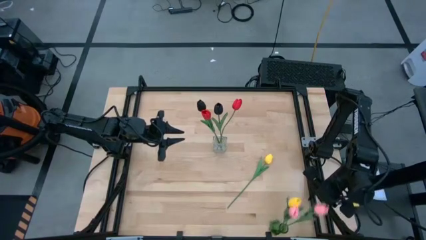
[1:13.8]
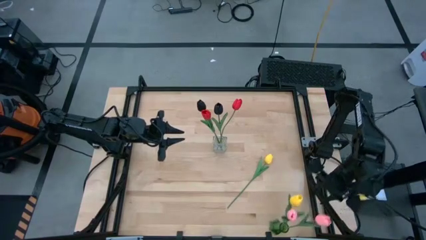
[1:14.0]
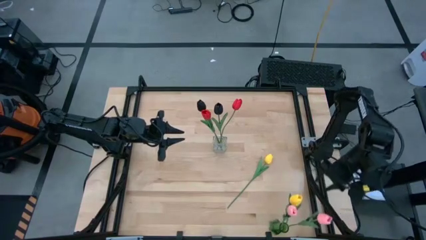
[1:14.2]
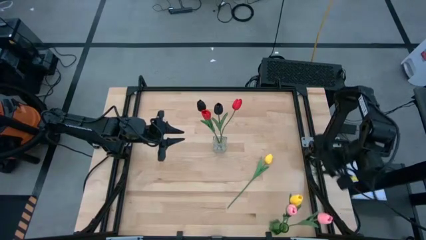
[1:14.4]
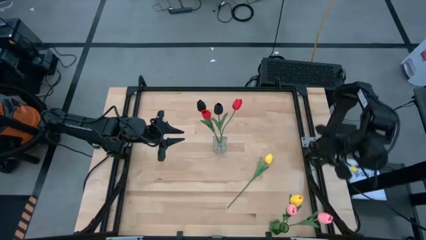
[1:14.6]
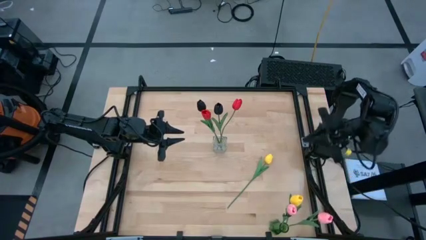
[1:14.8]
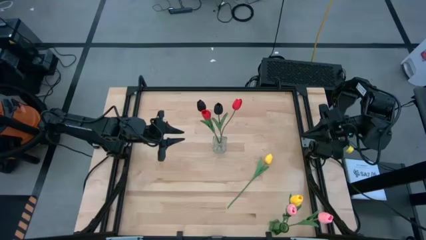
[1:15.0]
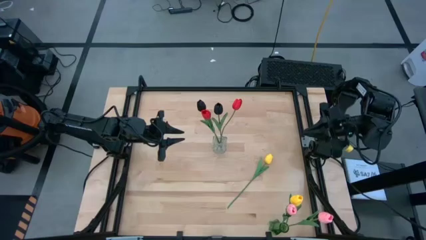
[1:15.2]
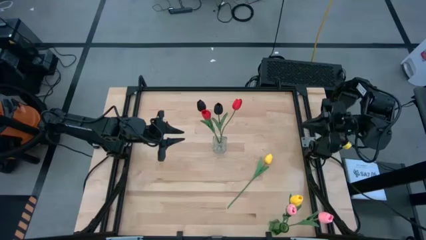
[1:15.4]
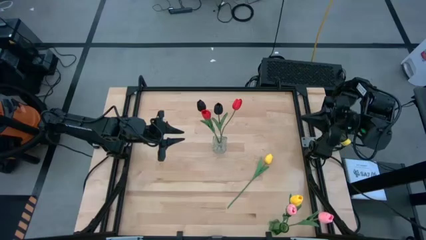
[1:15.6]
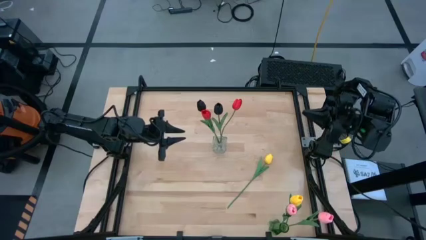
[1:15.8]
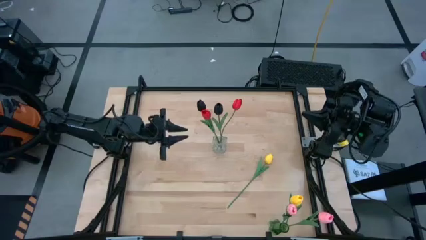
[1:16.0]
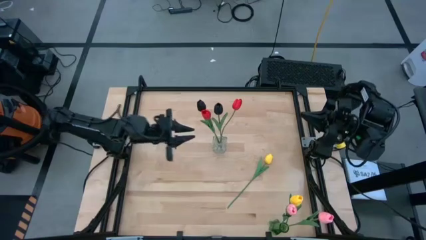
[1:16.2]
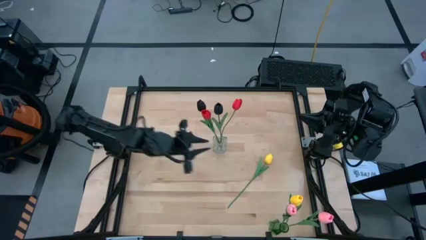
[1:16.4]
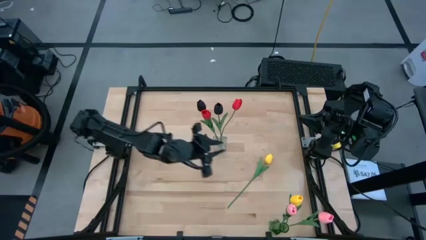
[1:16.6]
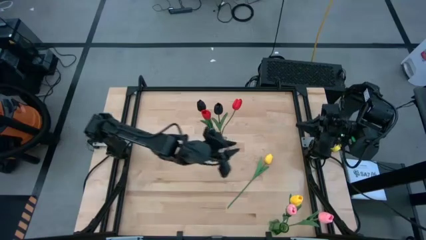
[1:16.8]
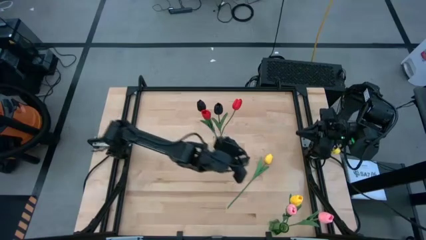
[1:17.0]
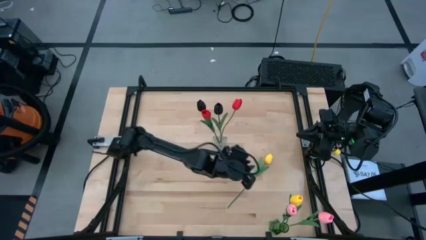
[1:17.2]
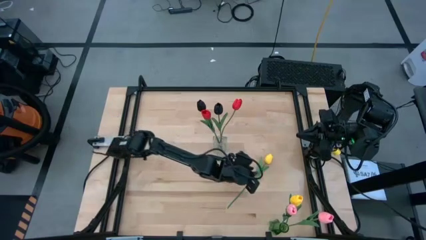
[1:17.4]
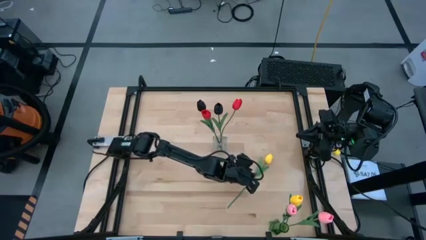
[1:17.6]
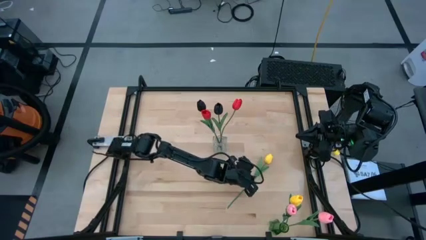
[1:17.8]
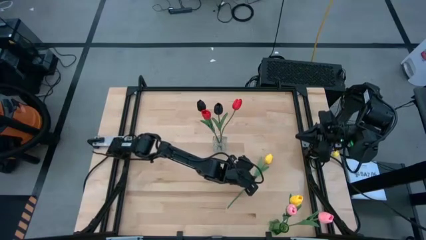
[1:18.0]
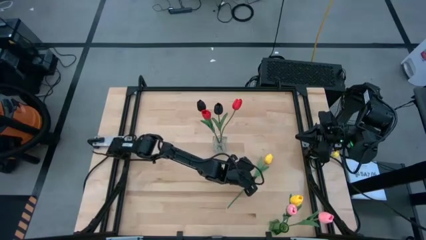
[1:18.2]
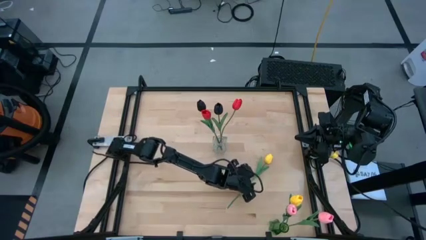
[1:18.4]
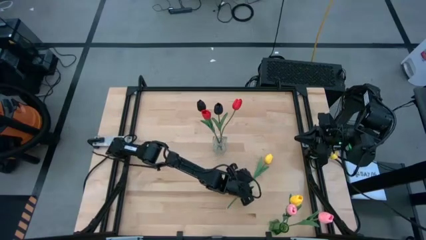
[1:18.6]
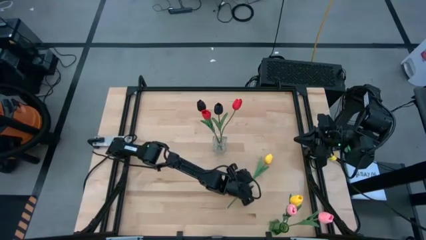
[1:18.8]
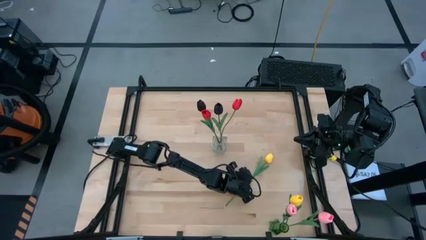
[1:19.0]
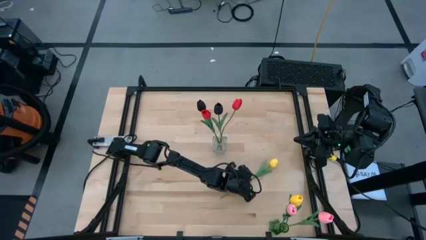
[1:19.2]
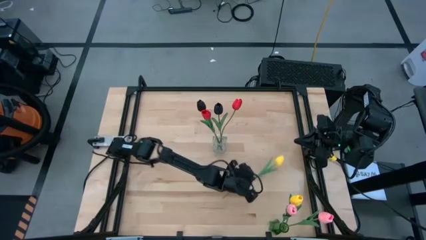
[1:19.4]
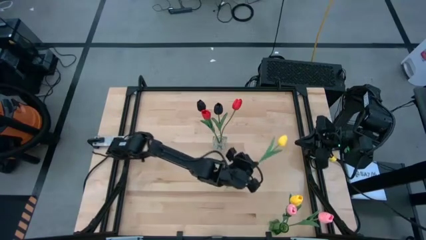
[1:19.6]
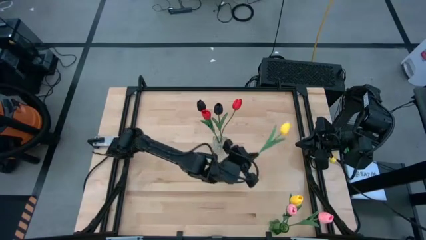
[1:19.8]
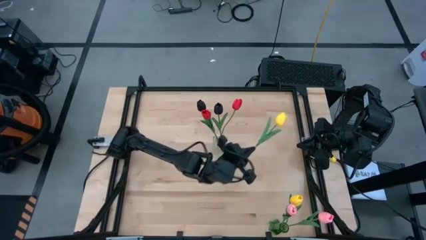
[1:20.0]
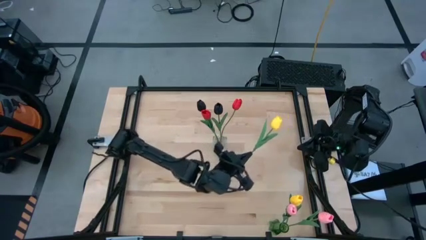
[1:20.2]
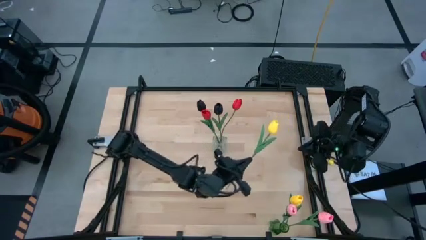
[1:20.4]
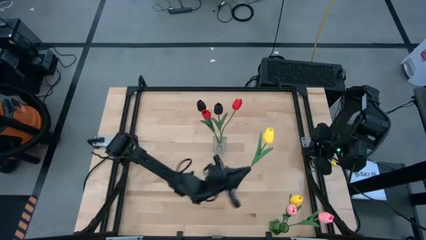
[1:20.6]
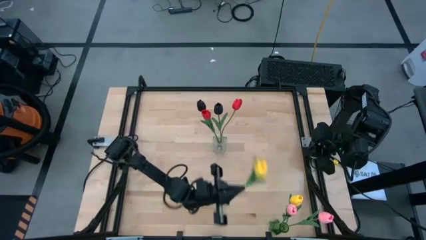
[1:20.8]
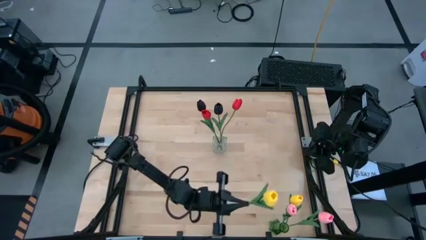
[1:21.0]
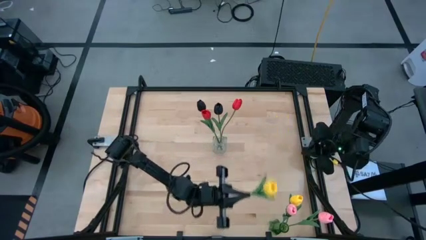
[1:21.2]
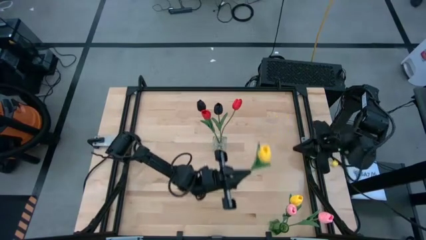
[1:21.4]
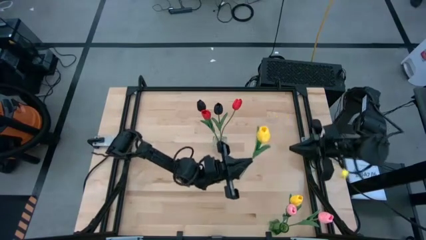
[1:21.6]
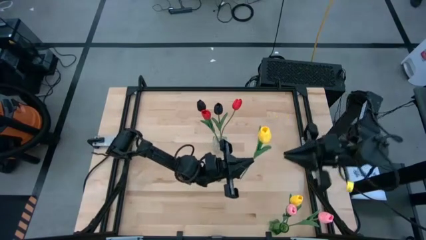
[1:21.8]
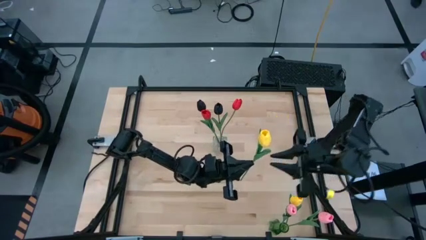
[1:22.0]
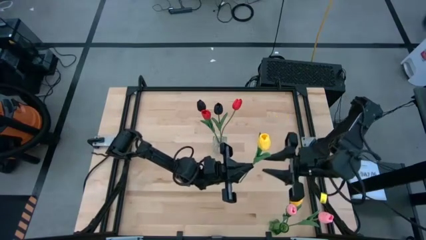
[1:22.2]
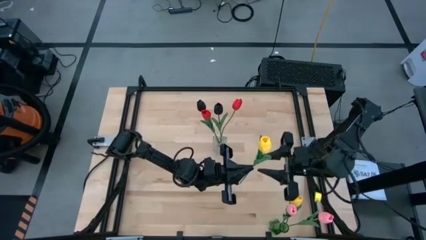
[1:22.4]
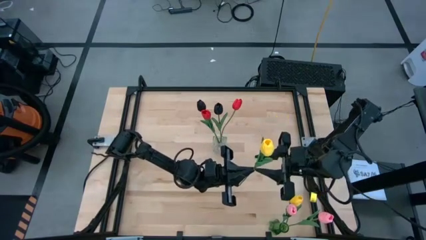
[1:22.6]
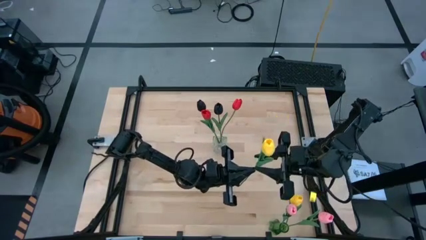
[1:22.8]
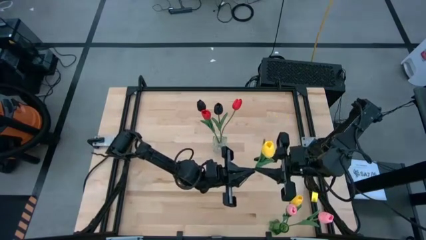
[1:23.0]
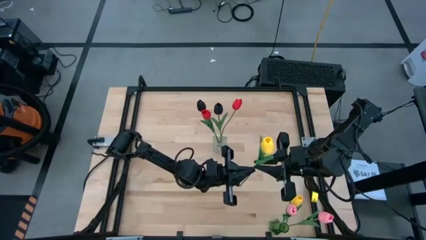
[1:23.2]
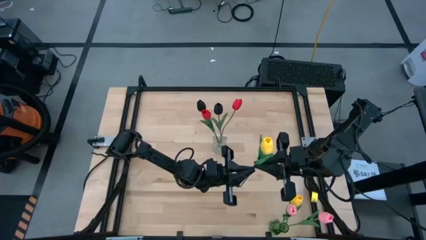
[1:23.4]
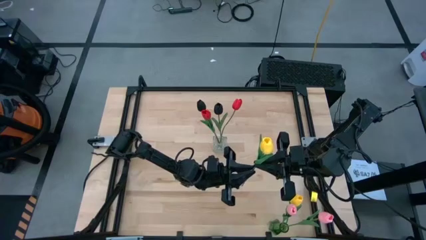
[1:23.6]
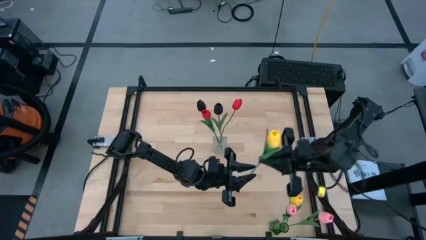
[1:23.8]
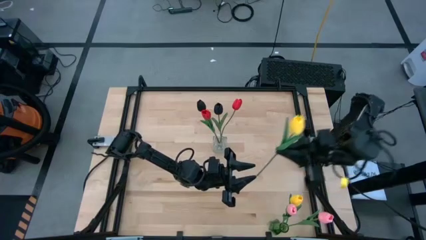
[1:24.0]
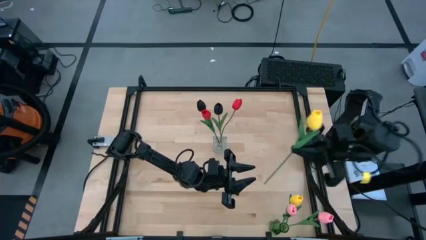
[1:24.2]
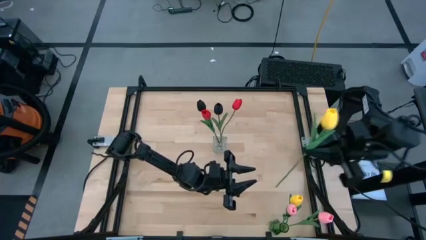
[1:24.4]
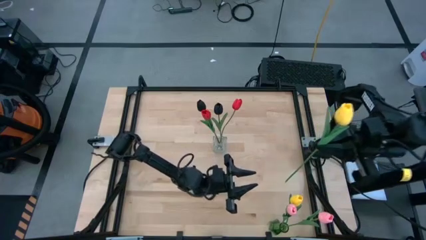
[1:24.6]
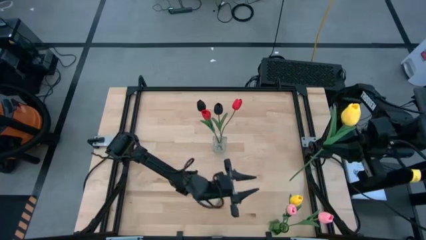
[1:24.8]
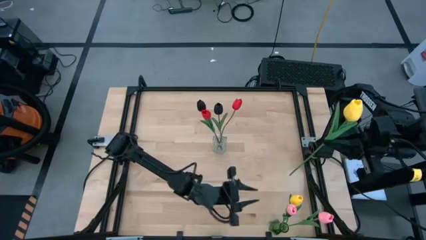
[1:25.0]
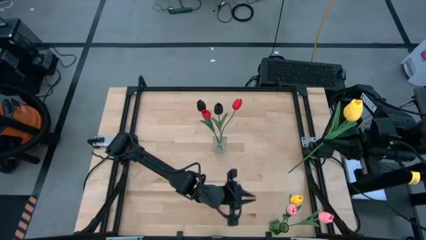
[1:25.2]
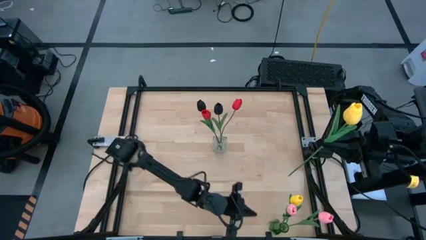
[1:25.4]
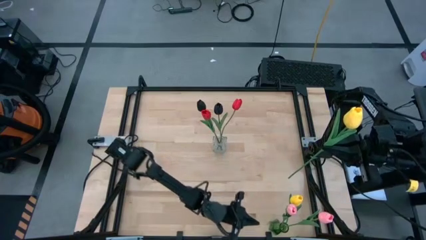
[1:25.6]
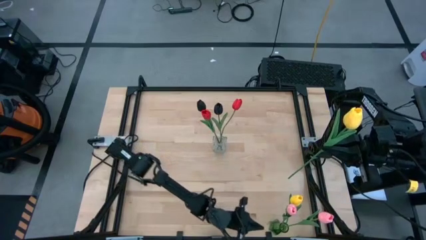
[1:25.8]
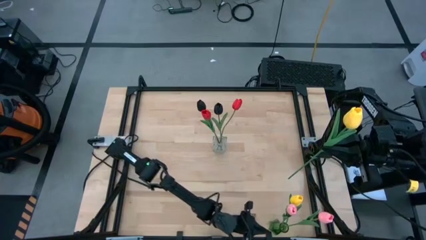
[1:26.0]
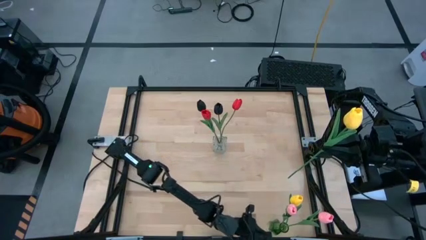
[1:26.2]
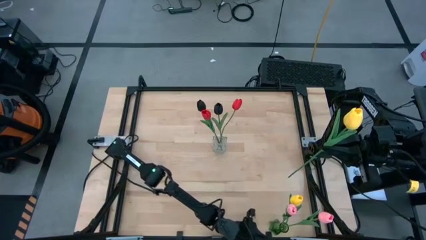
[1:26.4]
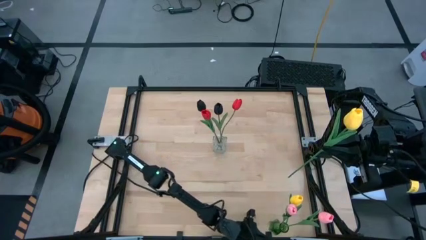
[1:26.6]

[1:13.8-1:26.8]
Task: Sort flowers into vase by color
Put the yellow flower into the green vase
